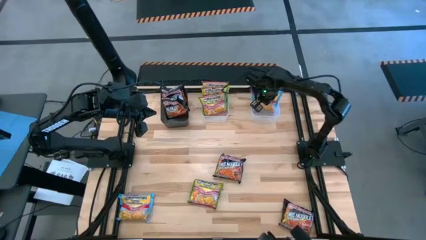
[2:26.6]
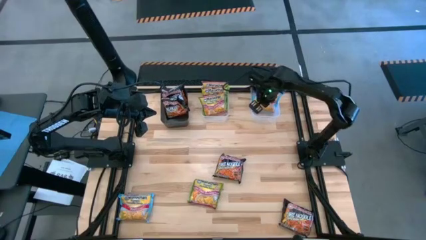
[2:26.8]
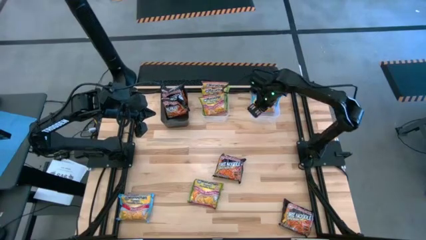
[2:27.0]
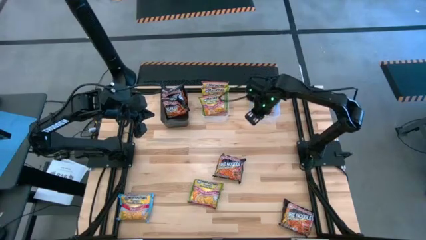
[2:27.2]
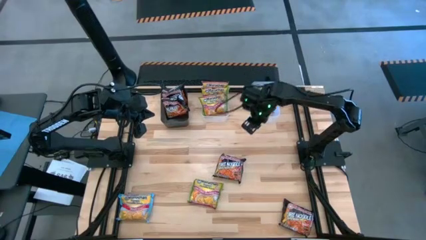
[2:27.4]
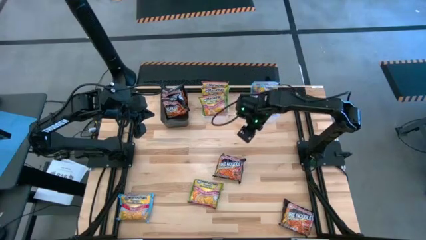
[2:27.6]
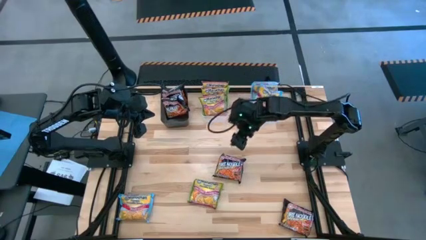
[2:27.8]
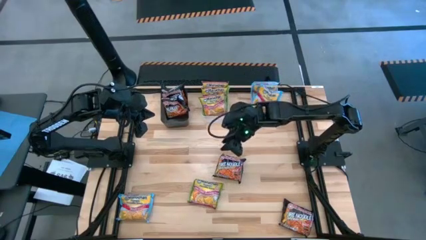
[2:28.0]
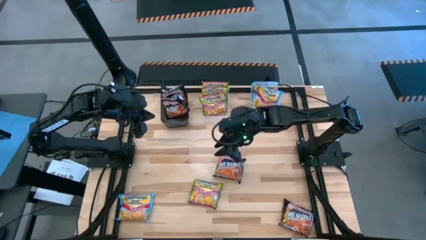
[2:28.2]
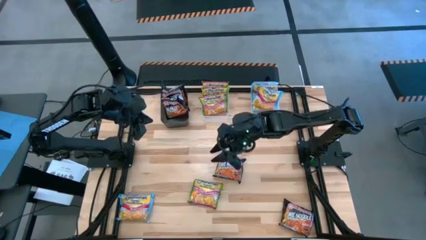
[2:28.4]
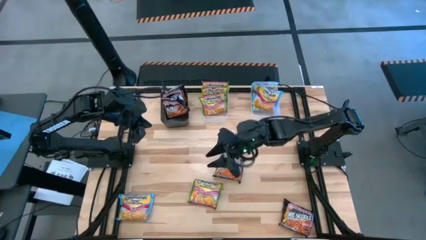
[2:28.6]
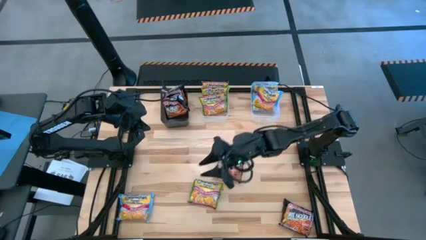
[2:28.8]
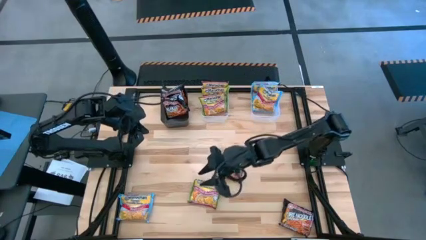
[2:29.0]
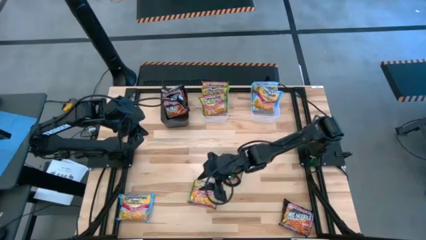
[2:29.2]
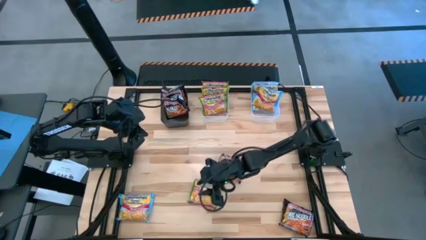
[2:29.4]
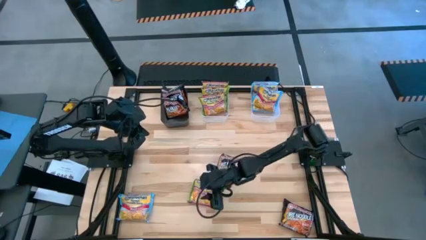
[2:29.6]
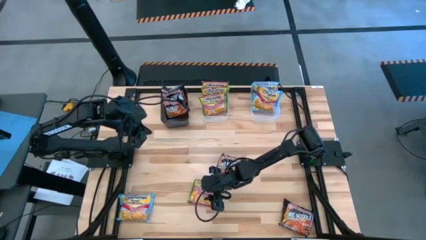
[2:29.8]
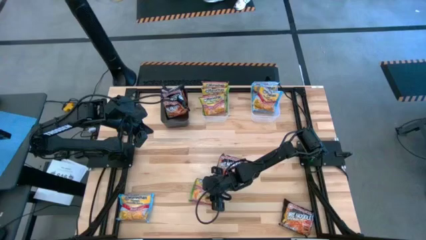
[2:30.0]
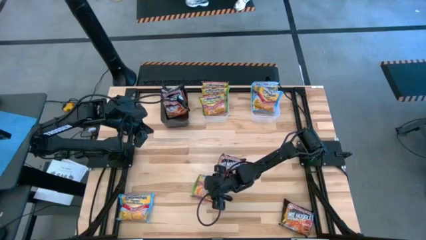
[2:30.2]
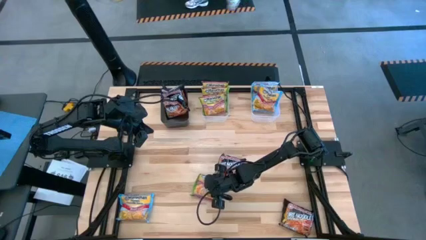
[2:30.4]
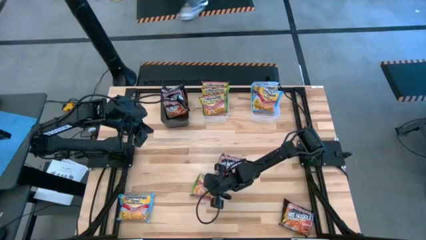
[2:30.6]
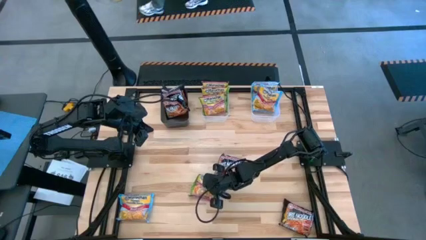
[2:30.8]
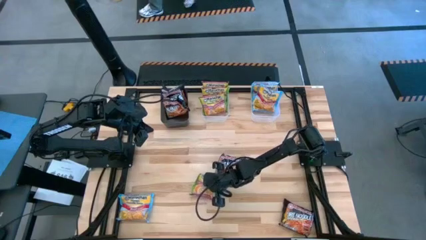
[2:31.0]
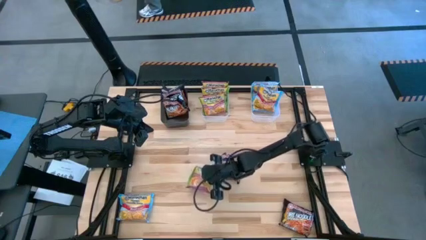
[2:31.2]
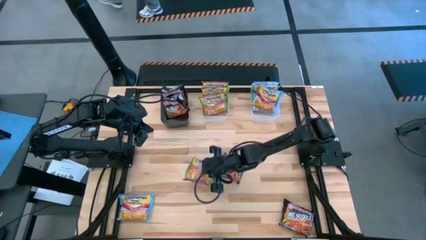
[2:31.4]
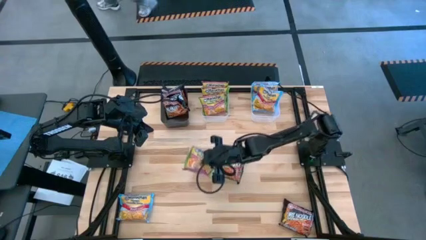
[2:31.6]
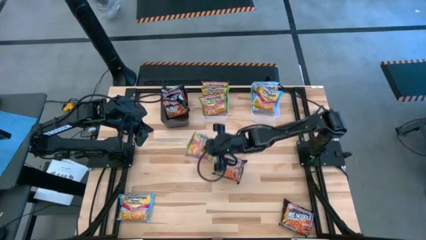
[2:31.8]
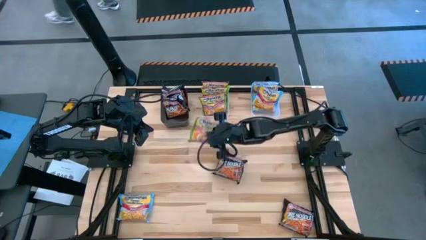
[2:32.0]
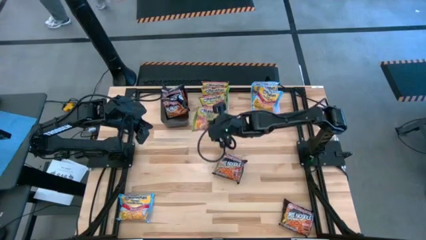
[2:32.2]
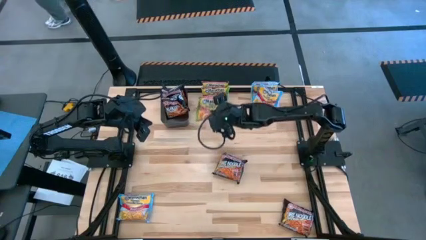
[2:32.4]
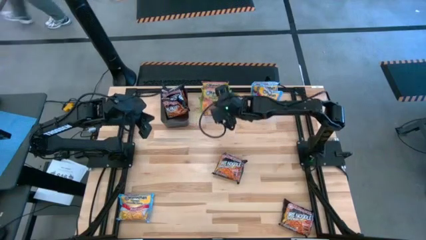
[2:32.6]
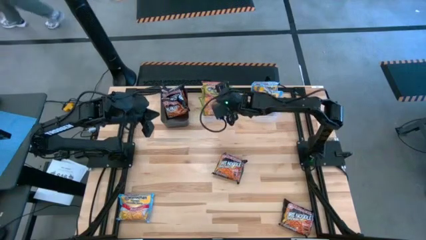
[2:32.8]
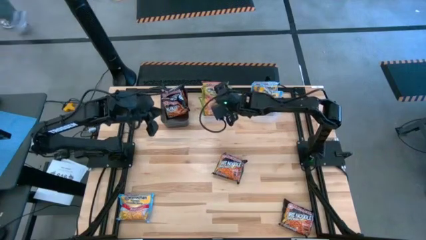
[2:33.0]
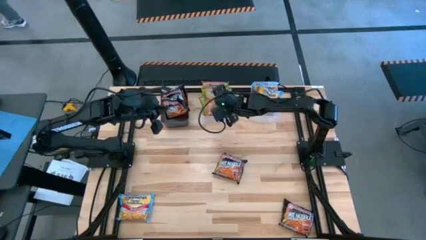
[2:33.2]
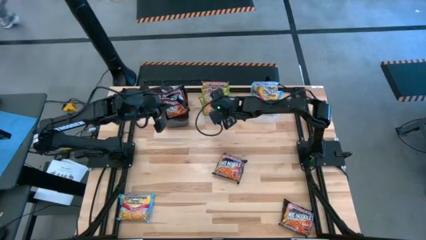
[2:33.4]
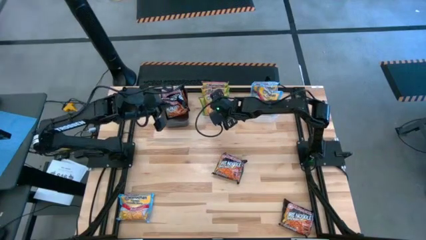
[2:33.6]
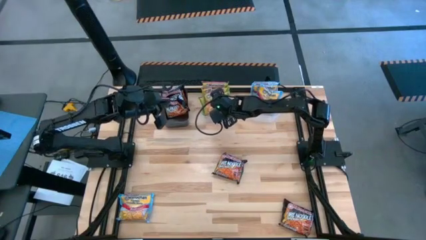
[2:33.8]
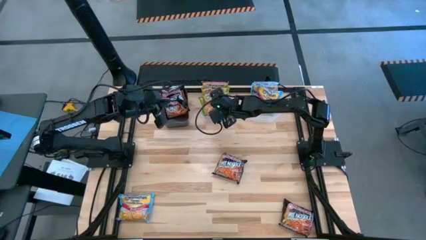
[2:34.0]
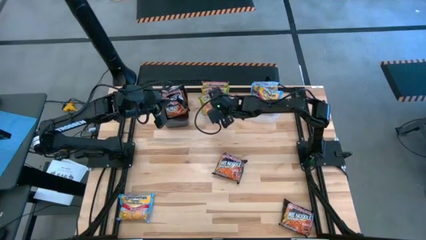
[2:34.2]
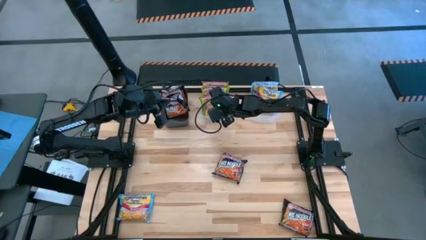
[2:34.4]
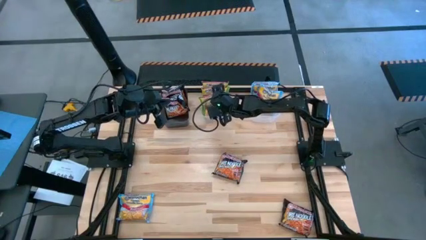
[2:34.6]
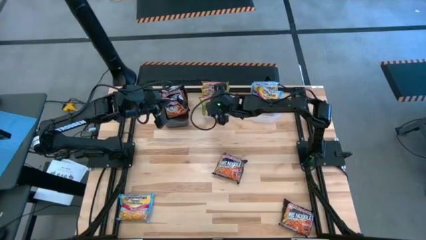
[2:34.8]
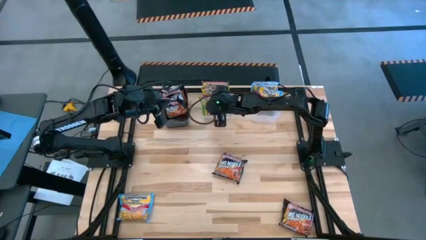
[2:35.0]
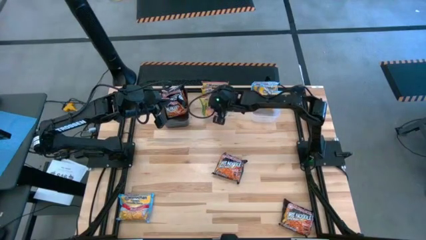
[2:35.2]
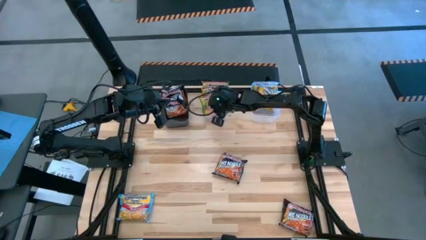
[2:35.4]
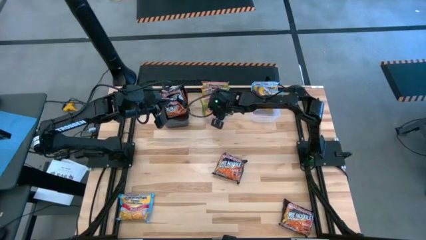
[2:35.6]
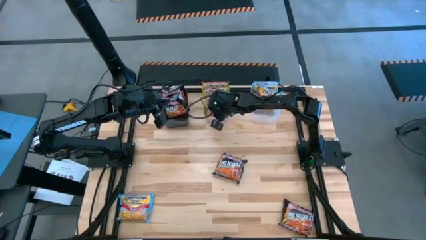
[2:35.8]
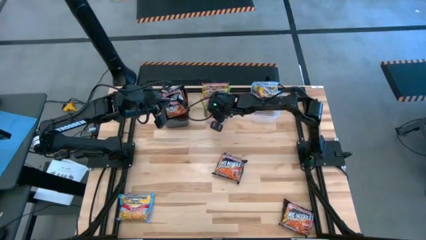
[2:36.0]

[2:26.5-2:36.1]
Task: Sort Maruchan noodles
Put the green noodle pack into the left transparent bin

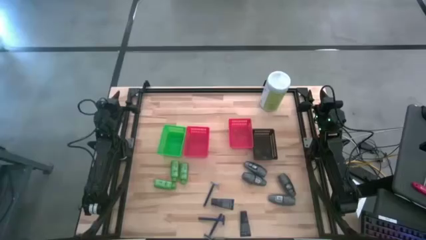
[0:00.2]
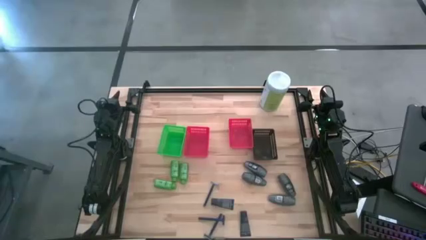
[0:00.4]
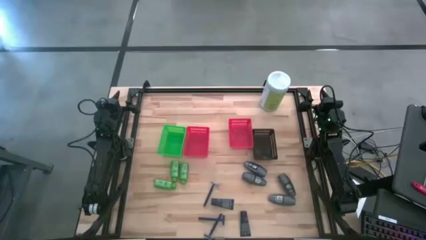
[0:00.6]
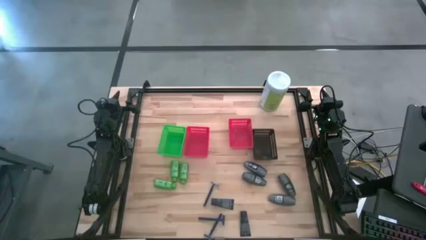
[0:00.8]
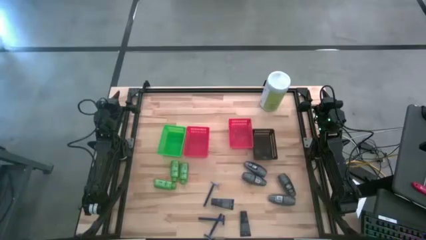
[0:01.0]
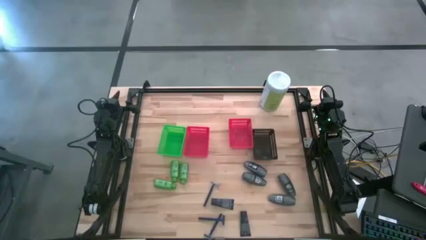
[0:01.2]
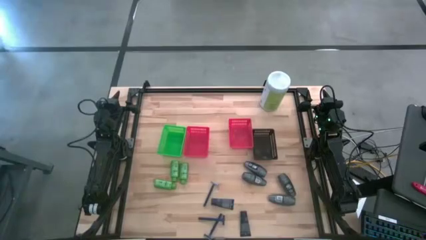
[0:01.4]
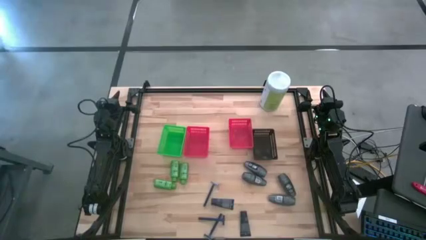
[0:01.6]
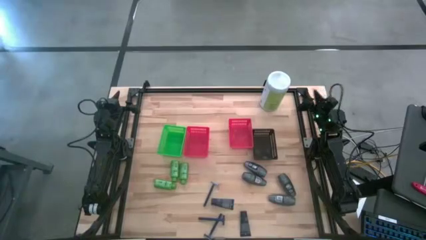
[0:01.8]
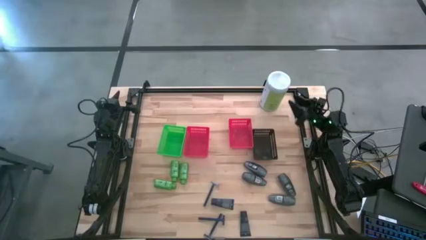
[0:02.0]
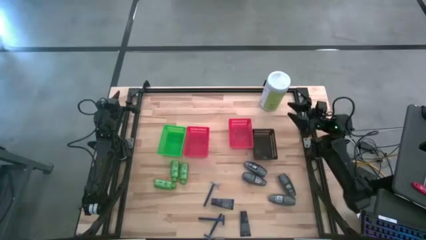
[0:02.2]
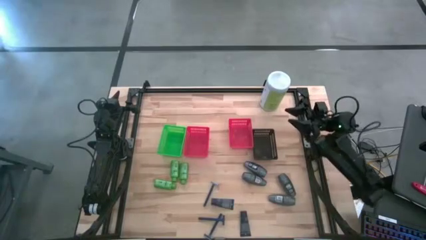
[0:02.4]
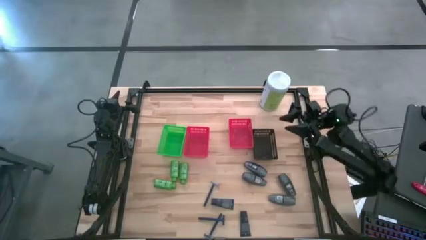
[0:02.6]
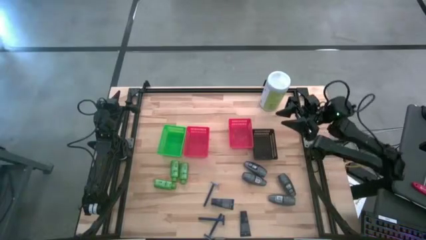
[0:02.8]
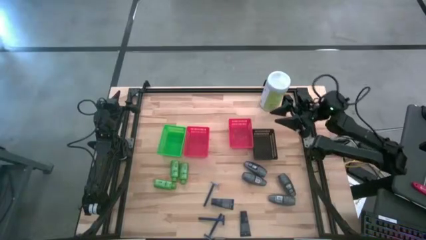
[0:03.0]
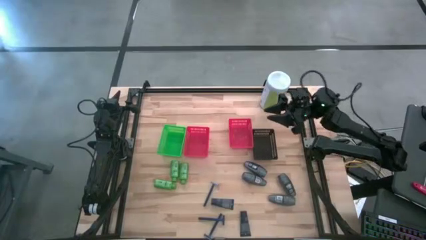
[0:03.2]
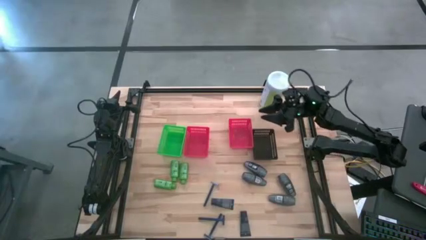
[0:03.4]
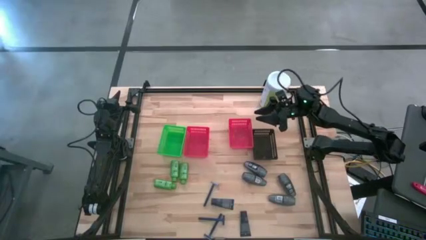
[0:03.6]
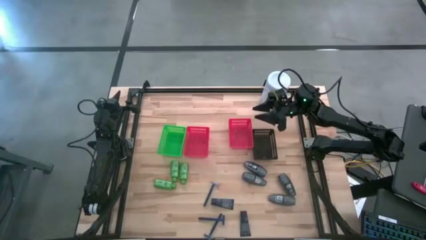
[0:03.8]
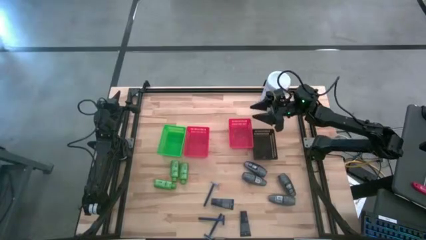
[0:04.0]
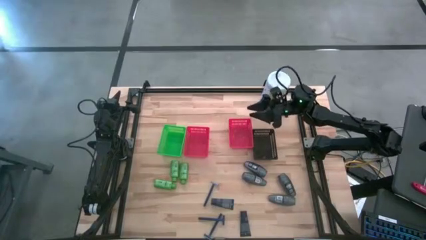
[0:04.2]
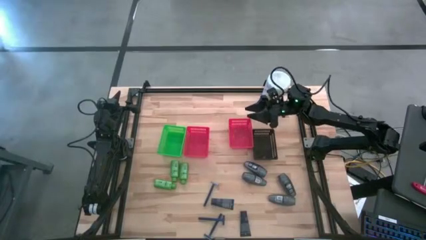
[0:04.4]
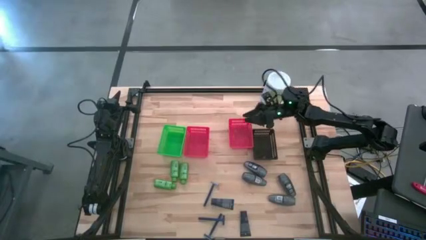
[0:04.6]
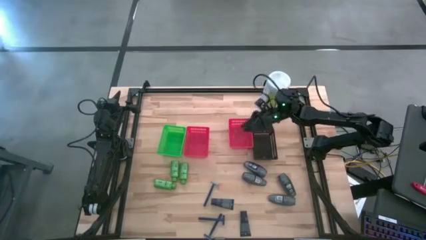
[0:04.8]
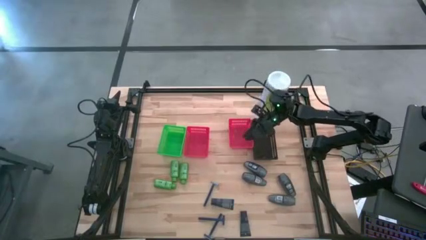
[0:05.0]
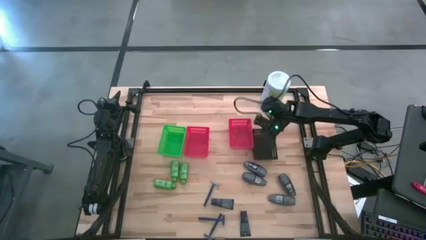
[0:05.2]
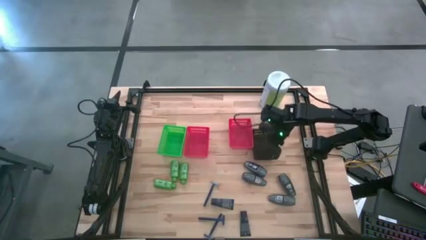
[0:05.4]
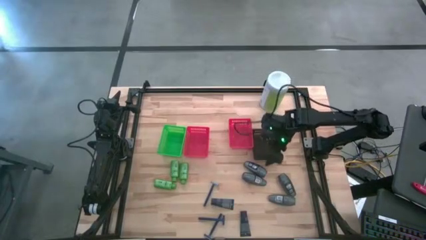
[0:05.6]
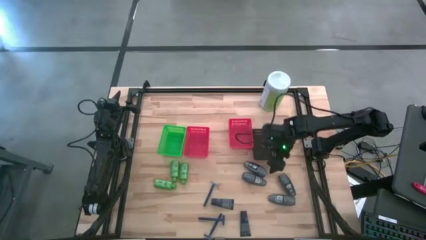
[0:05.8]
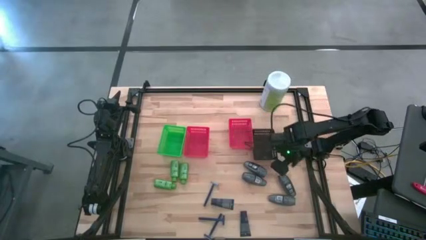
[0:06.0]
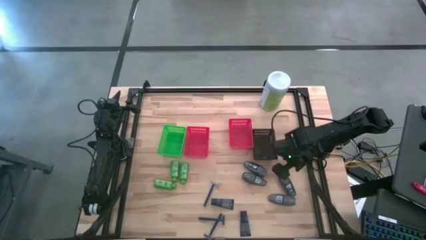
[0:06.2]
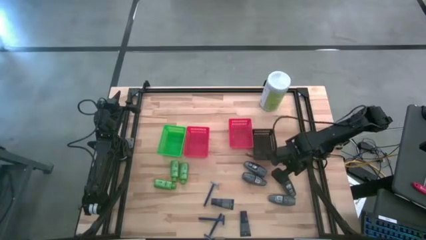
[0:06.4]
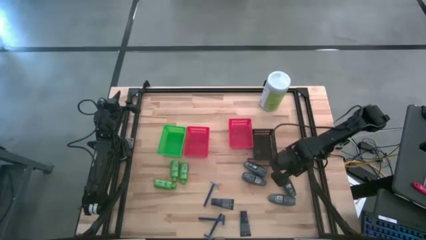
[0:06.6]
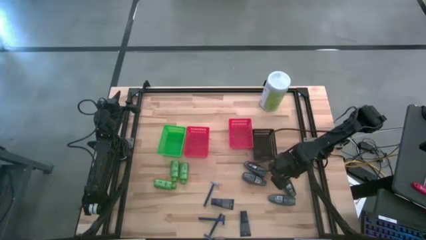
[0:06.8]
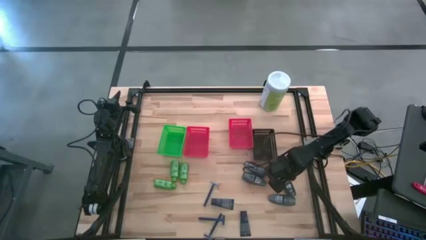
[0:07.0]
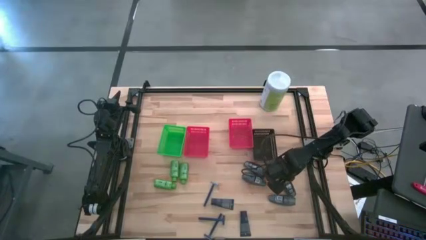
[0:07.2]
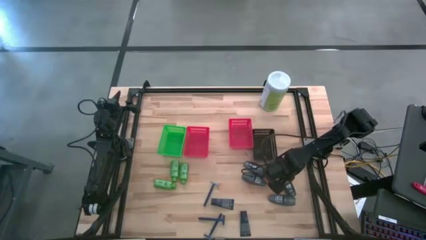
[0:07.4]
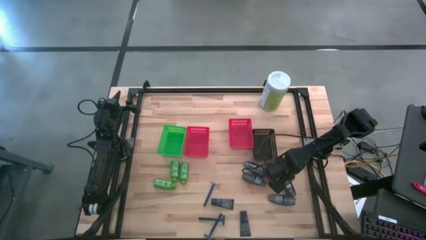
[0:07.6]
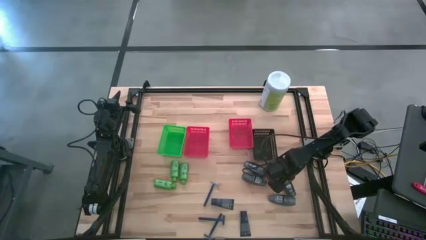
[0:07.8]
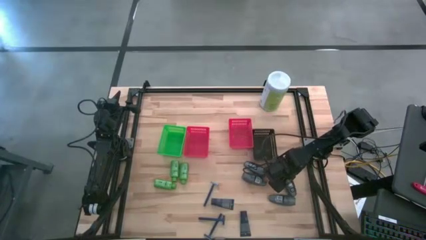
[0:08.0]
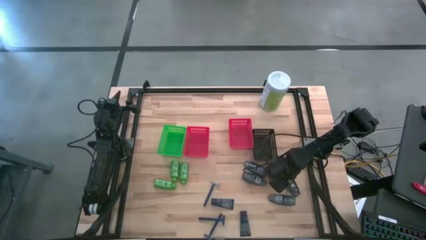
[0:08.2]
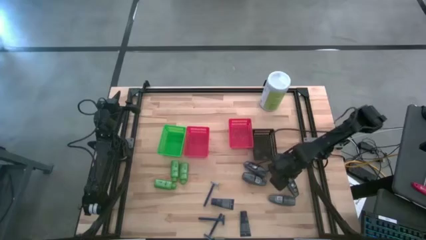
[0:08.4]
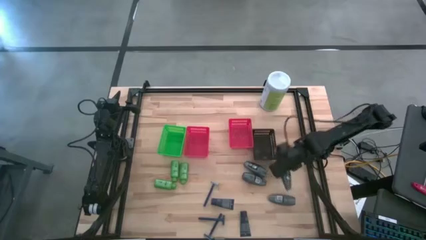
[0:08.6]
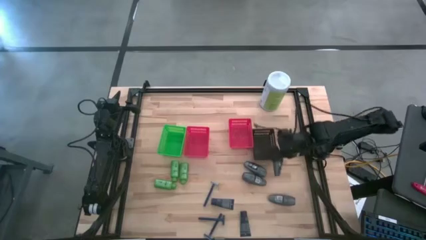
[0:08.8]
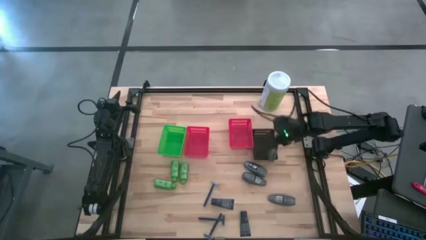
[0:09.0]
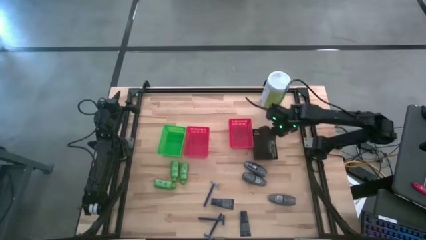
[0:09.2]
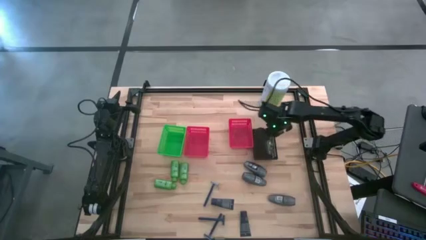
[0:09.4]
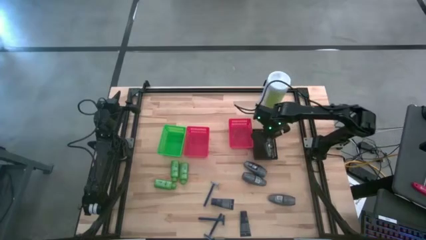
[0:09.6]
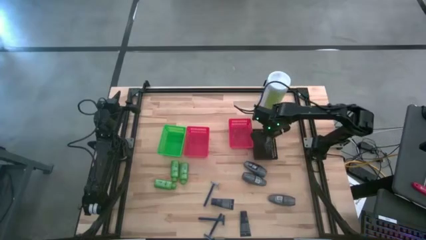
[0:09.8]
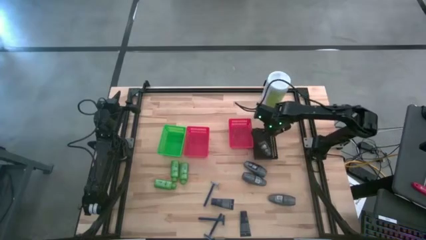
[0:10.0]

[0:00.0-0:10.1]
Task: Pick & Place Travel size toiletries
Put the gray deodorant into the black basket
